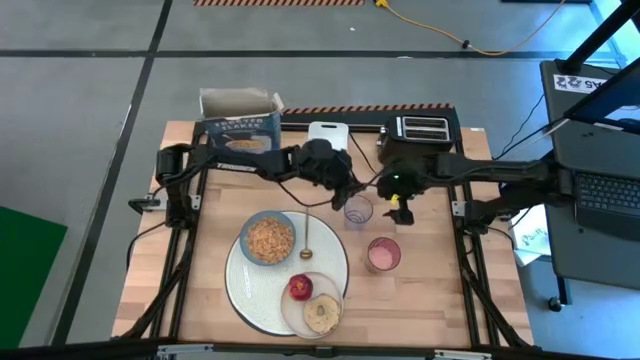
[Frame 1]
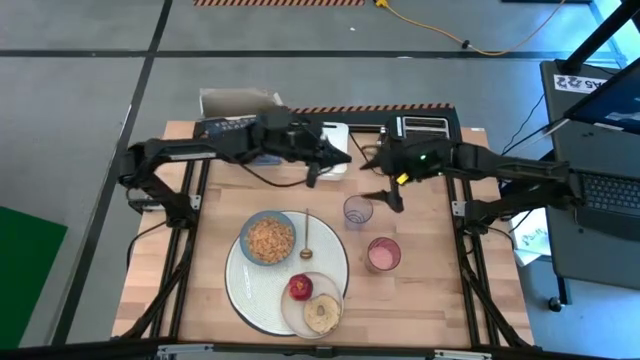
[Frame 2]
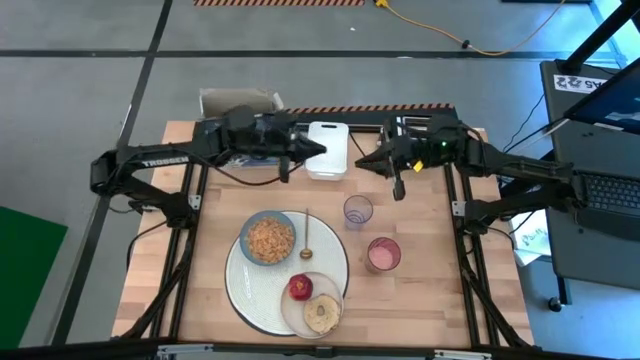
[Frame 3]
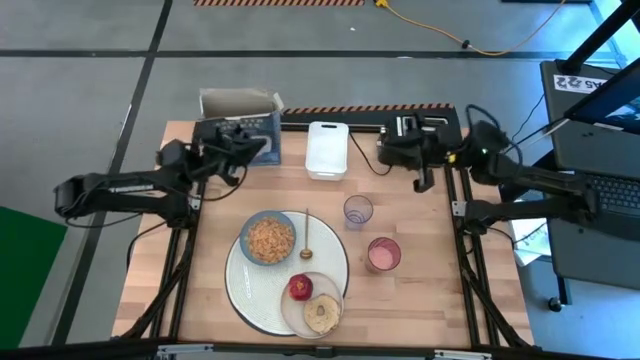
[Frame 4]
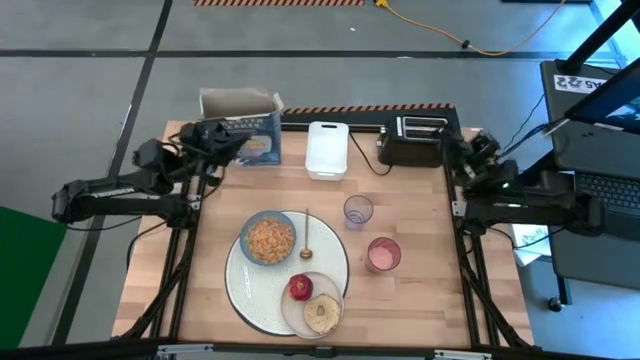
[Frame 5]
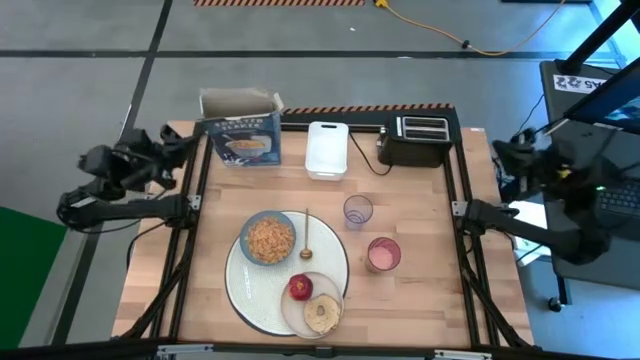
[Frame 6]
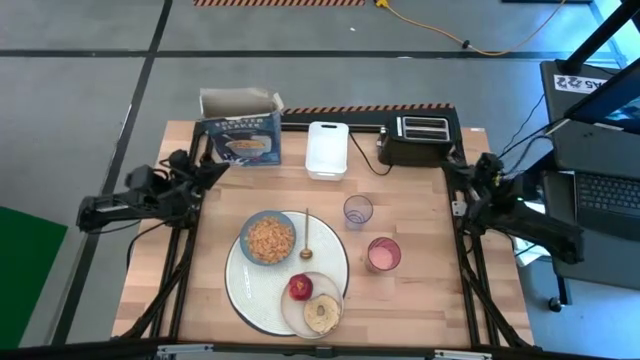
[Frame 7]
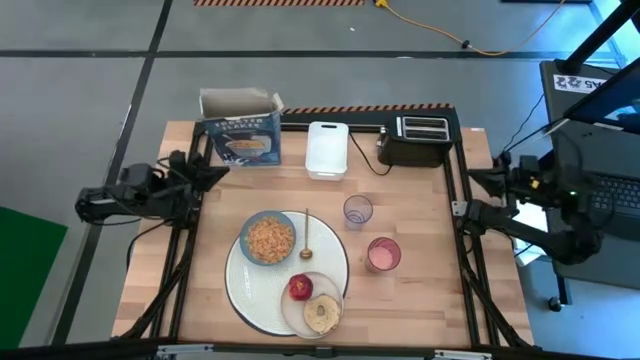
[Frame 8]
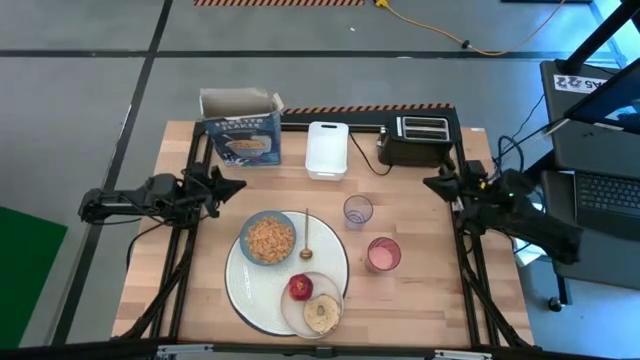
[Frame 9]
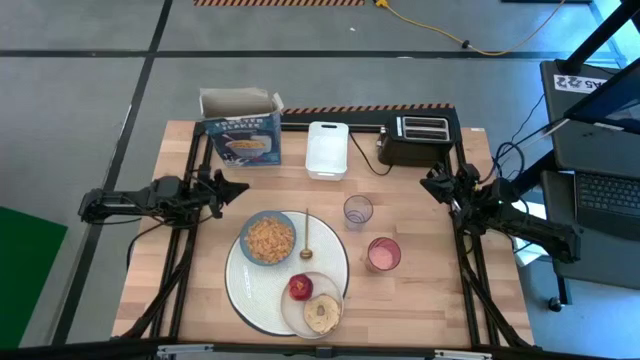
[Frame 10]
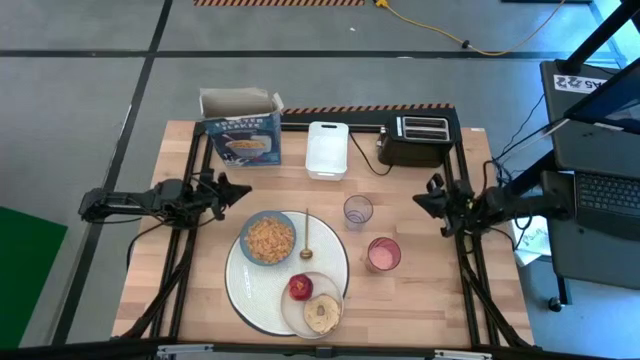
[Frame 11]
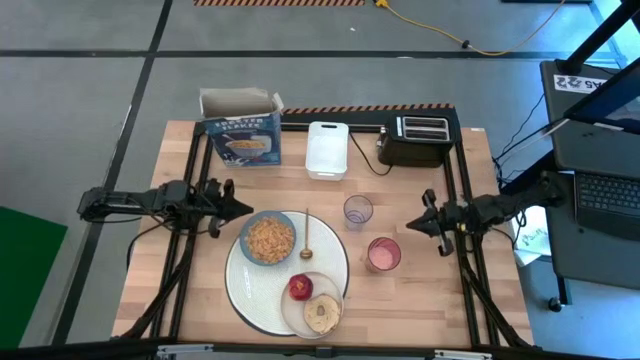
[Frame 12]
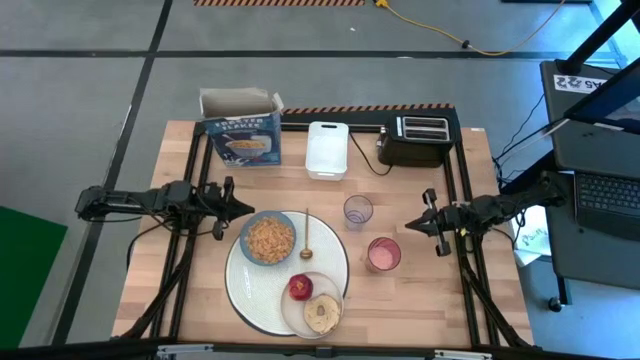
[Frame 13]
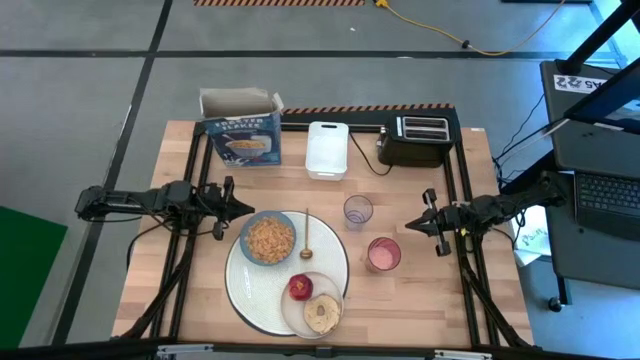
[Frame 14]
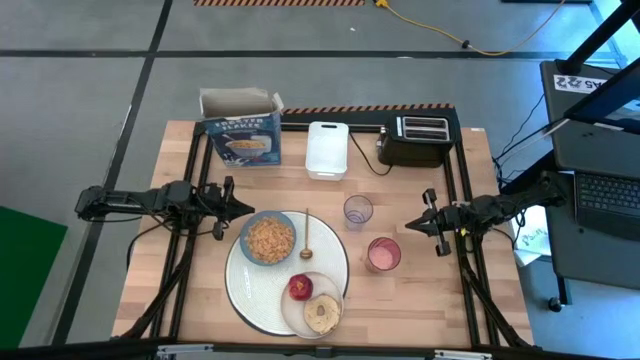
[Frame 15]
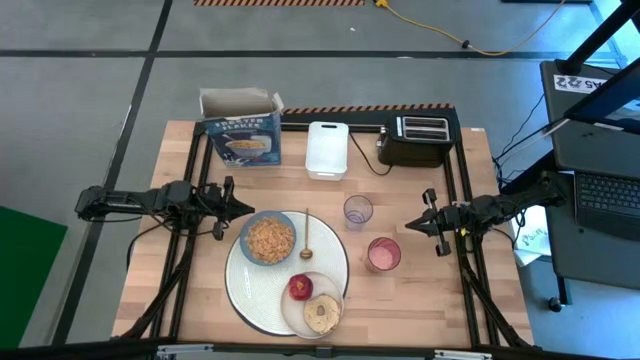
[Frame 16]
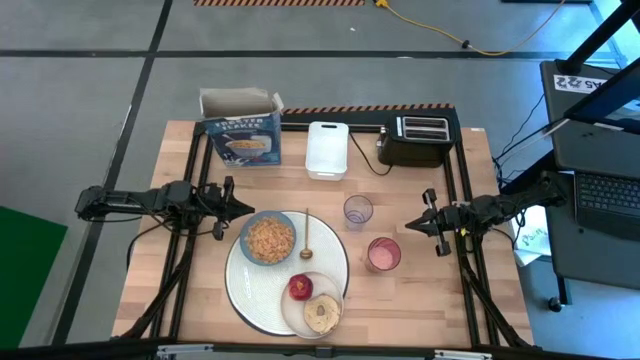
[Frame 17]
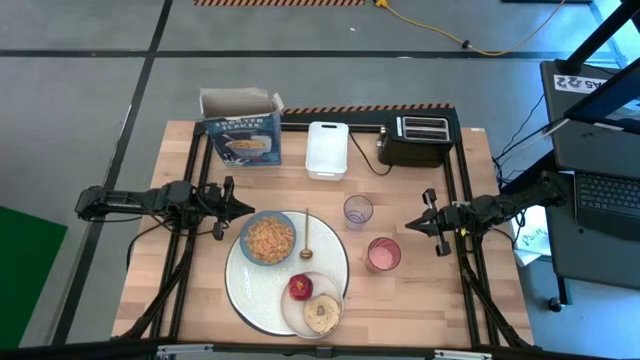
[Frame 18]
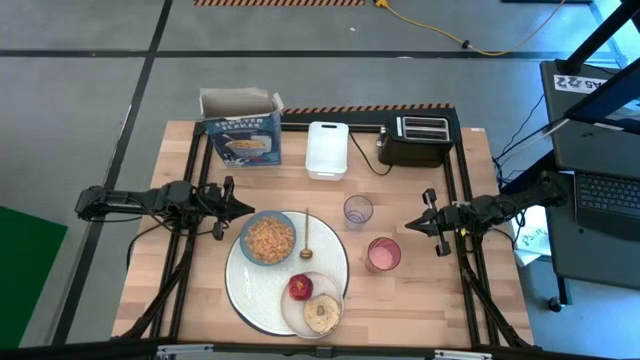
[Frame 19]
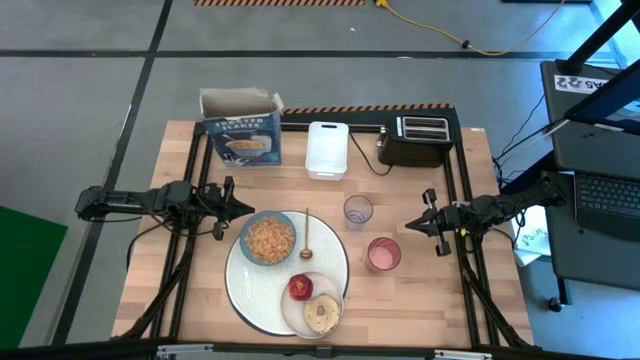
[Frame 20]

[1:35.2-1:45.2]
Task: Arrange a breakfast setting
Return to Home Position

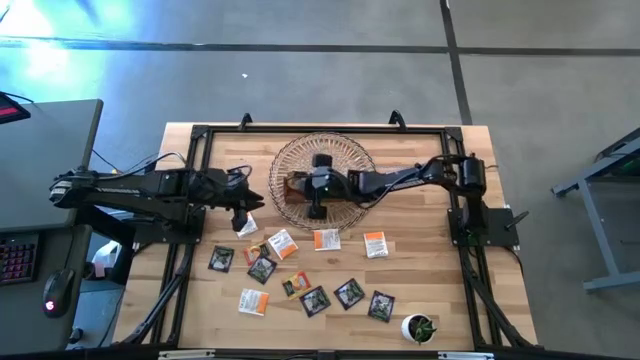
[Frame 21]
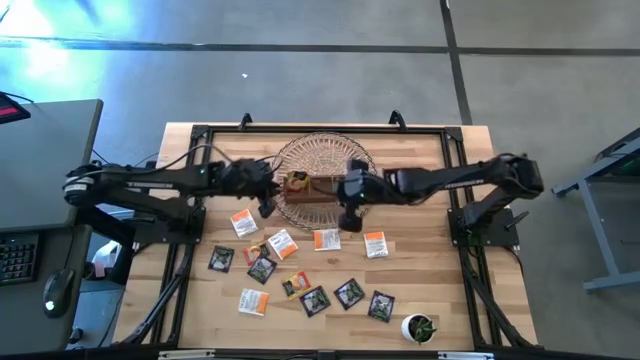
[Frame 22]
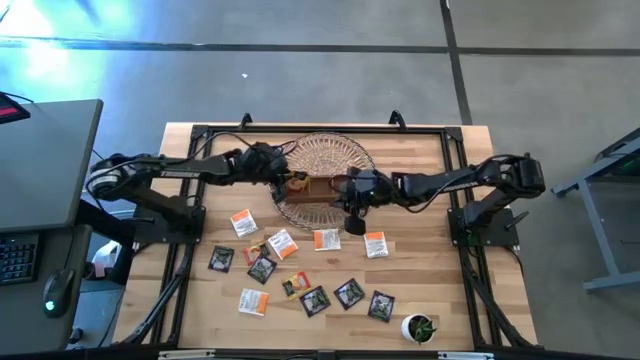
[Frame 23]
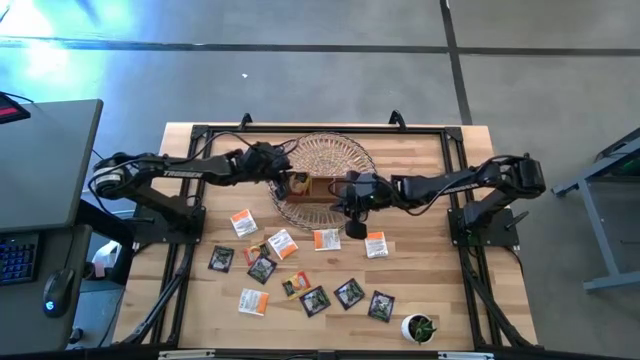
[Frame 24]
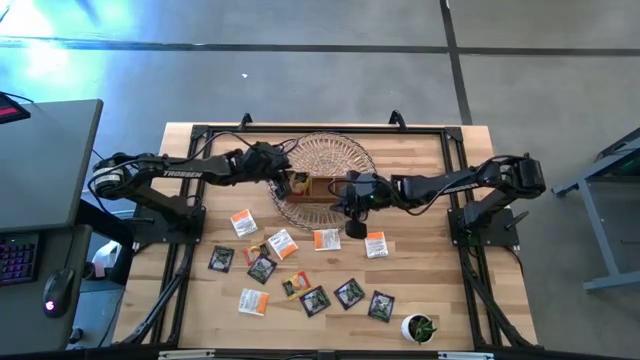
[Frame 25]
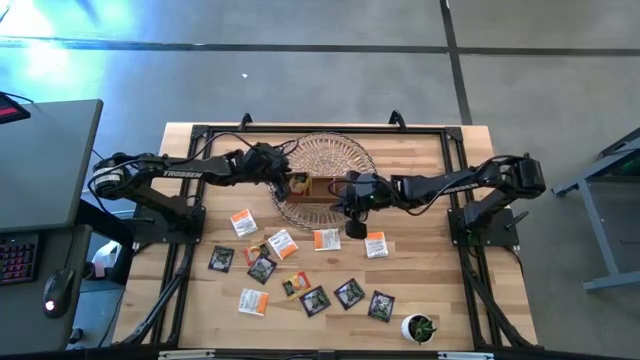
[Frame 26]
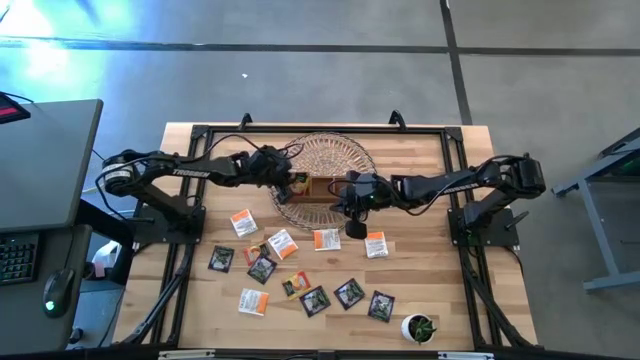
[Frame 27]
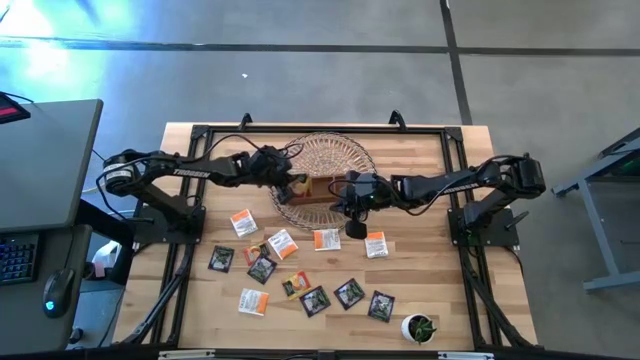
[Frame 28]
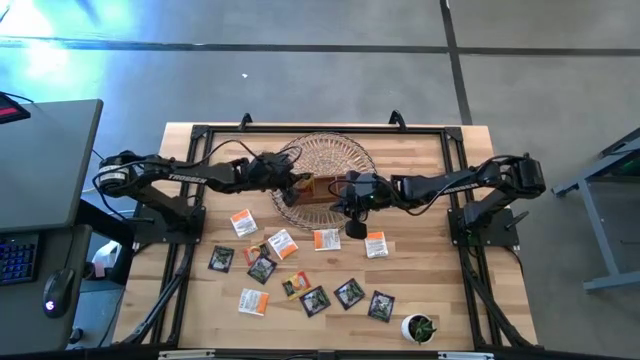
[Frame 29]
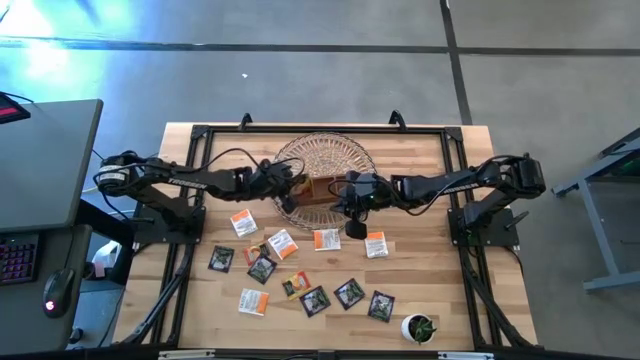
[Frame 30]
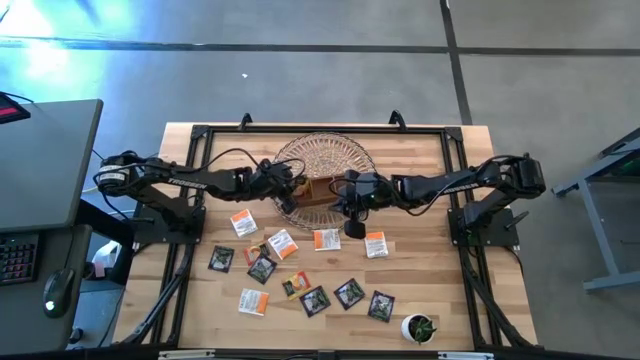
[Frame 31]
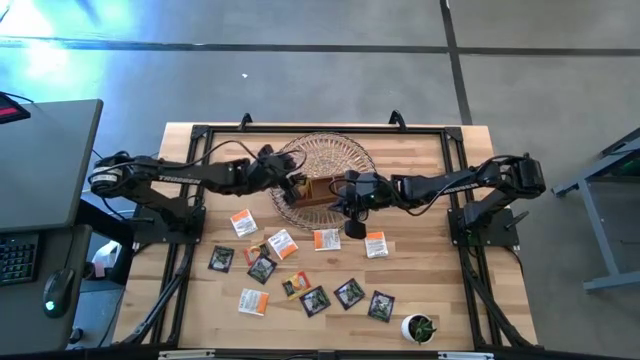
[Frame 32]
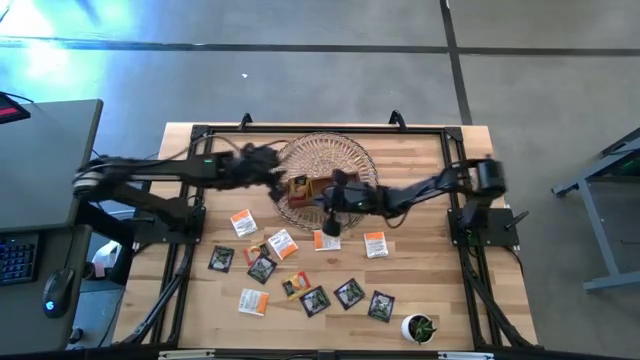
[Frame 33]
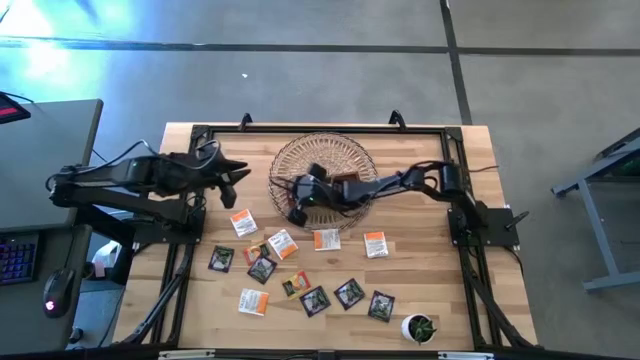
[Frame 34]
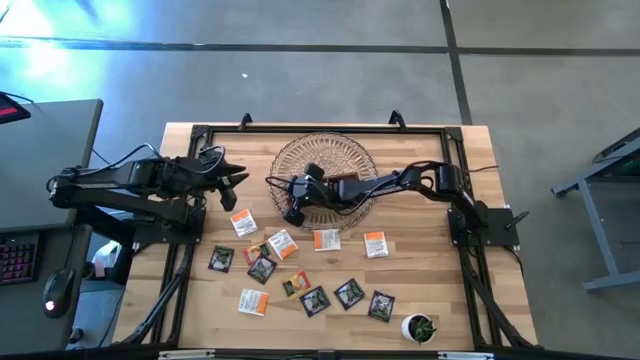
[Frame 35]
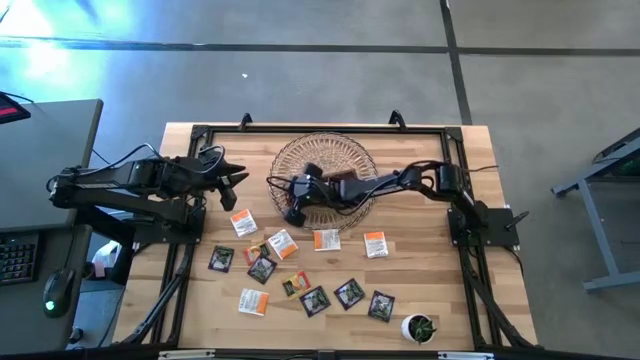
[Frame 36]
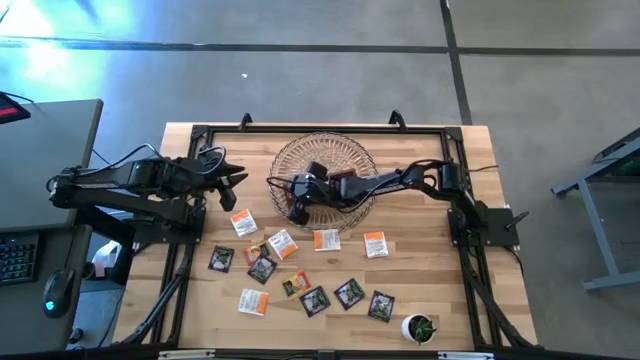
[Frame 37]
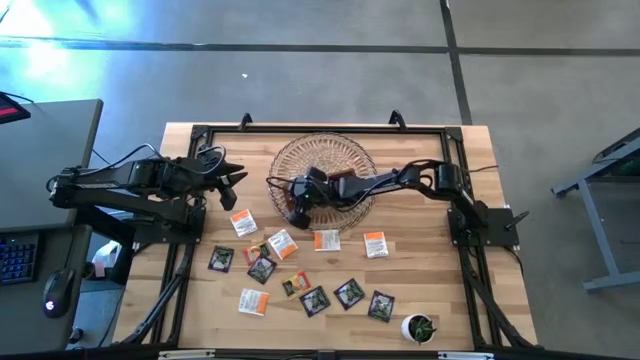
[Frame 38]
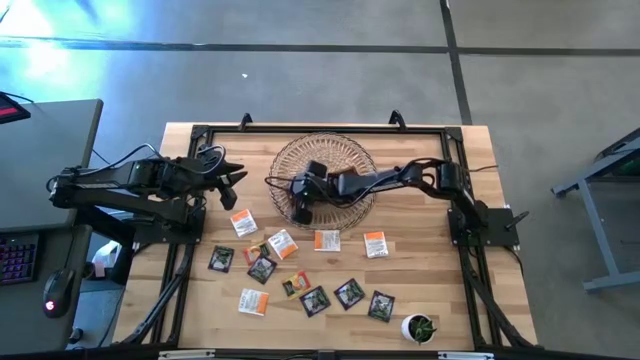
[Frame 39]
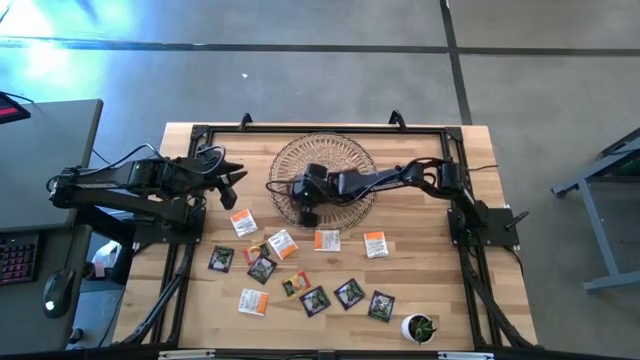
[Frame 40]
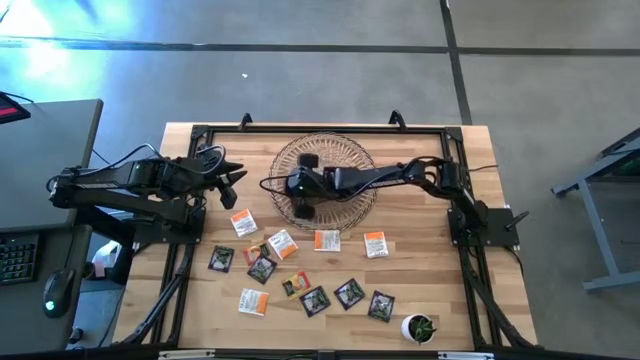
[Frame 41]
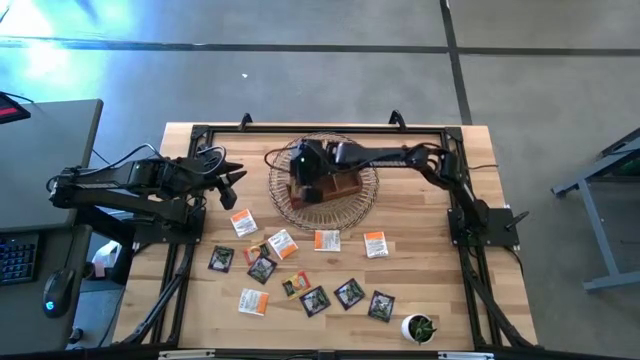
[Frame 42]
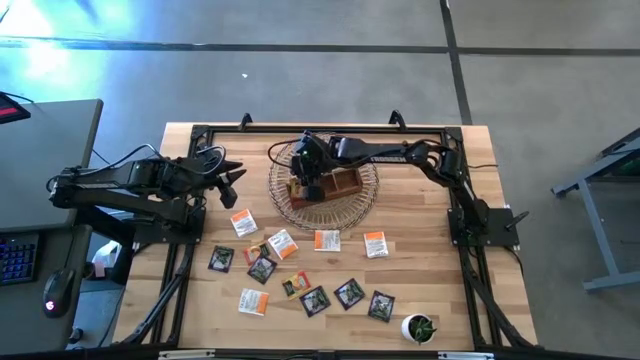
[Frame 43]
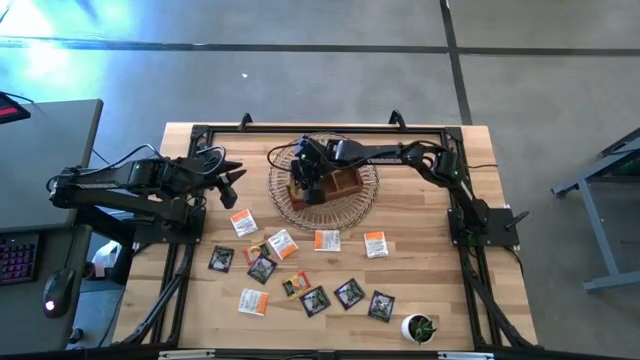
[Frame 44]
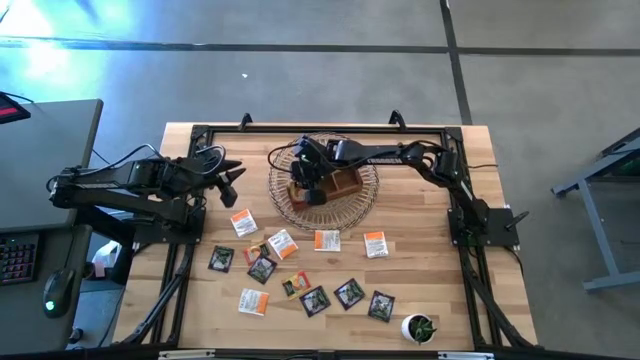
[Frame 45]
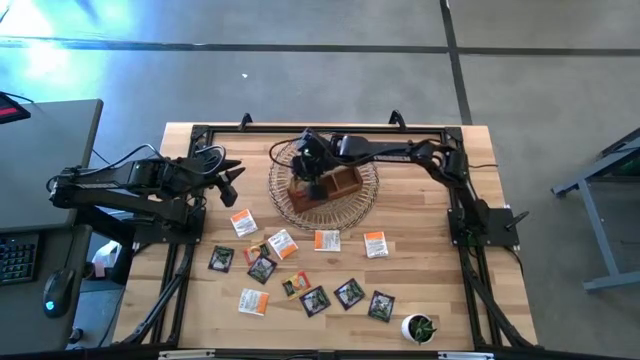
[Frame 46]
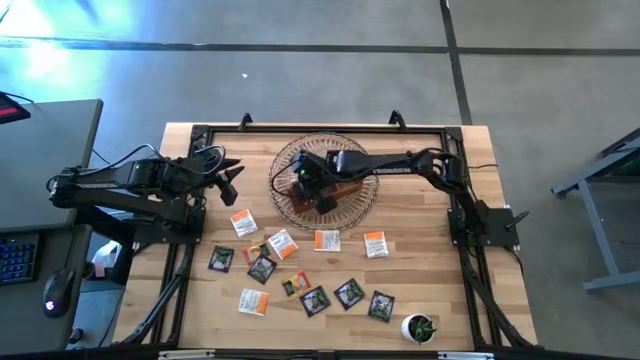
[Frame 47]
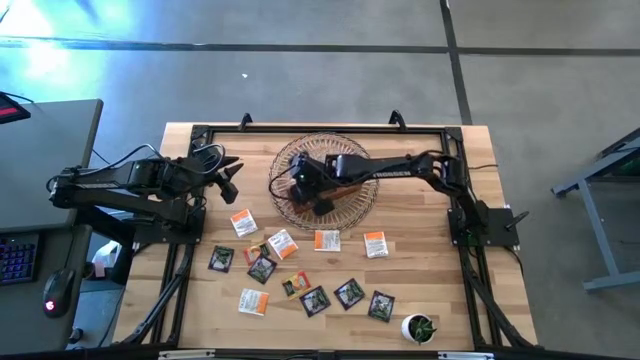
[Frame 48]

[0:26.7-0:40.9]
Task: Pick & Place Tea
Put the yellow tea bag into the left section of the wooden organizer
